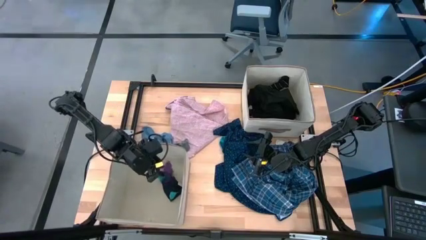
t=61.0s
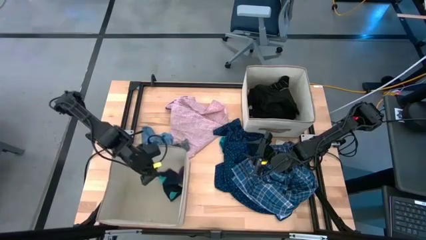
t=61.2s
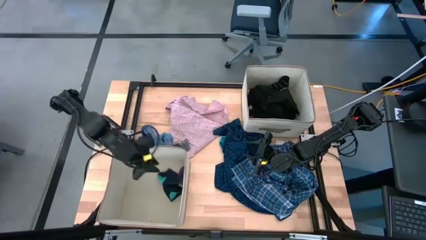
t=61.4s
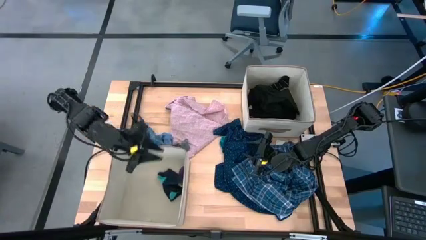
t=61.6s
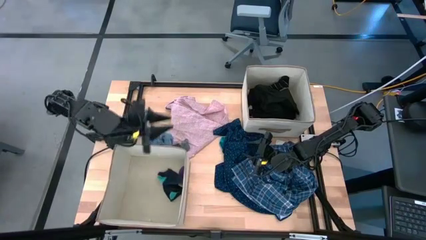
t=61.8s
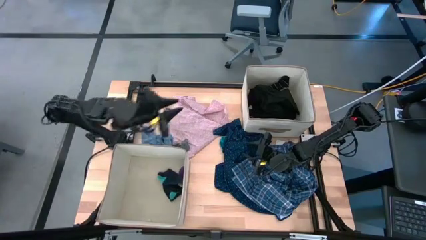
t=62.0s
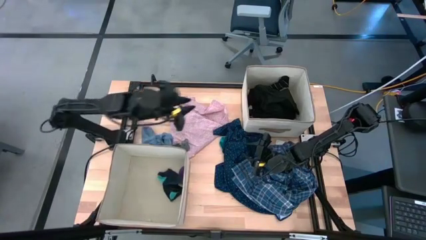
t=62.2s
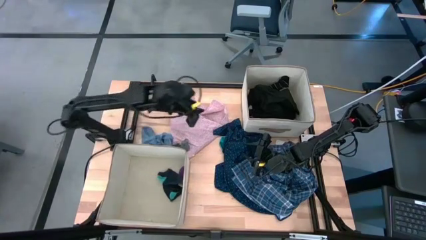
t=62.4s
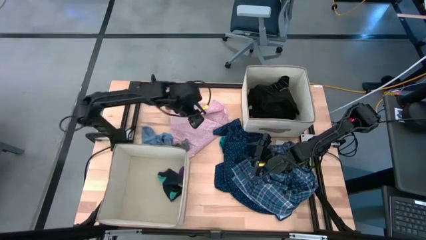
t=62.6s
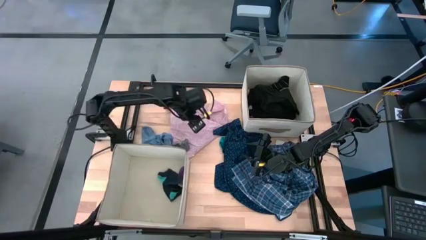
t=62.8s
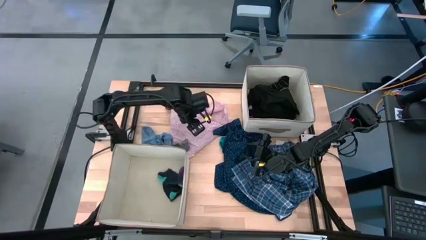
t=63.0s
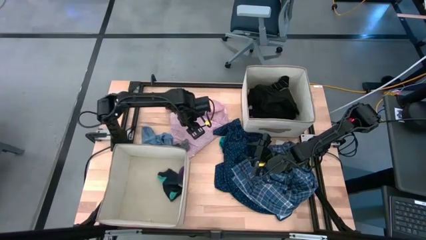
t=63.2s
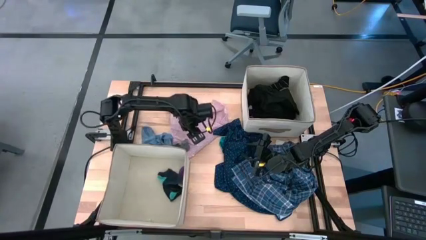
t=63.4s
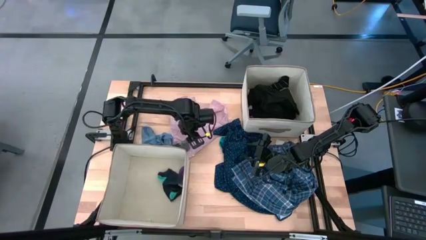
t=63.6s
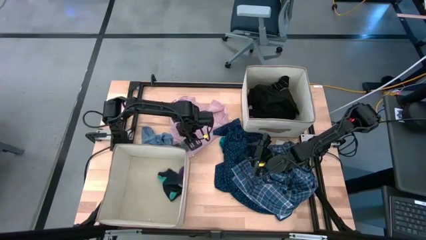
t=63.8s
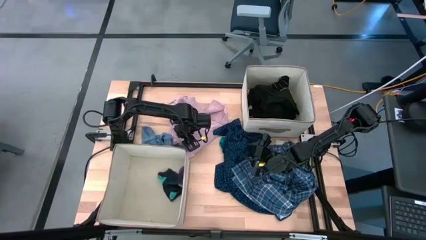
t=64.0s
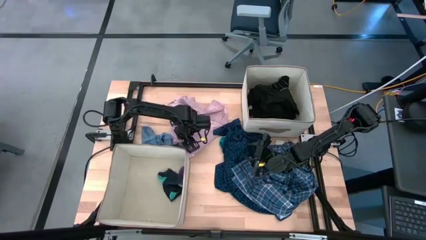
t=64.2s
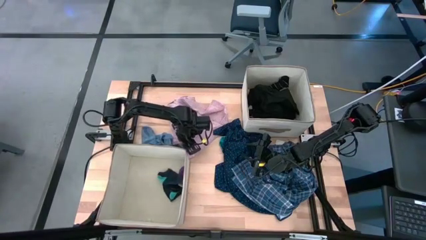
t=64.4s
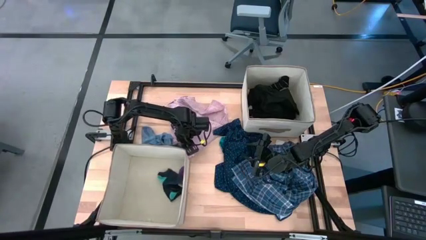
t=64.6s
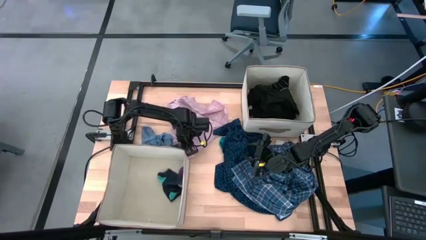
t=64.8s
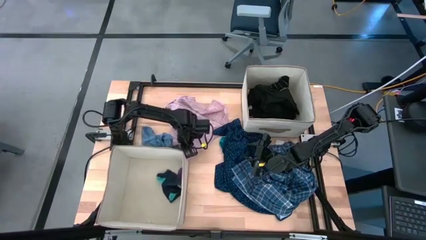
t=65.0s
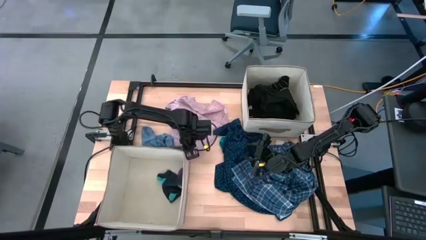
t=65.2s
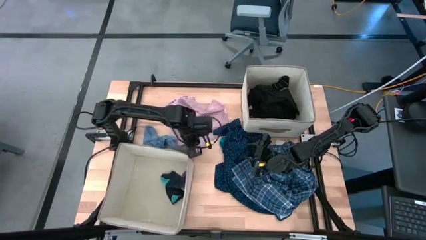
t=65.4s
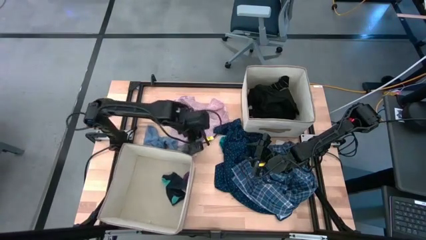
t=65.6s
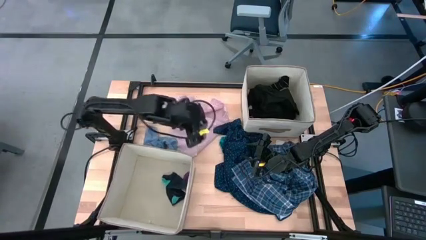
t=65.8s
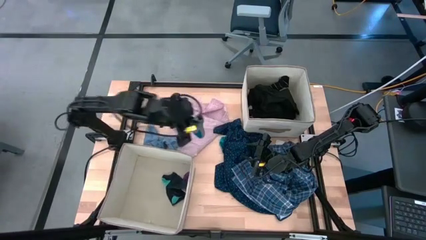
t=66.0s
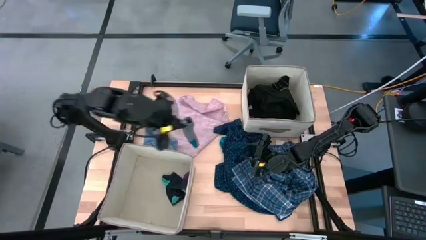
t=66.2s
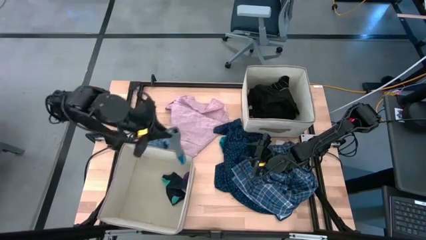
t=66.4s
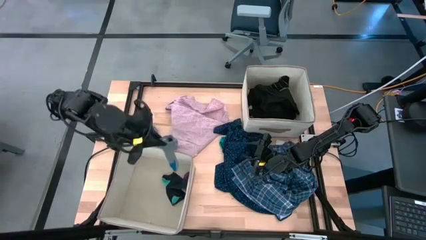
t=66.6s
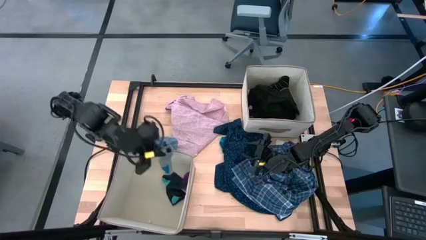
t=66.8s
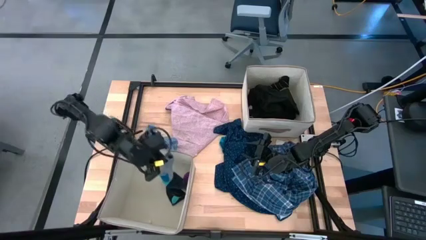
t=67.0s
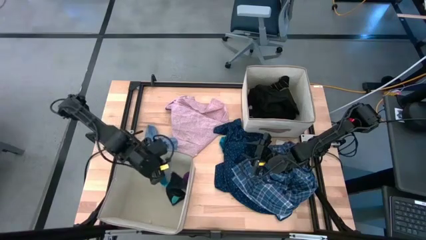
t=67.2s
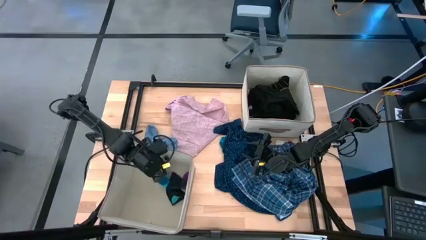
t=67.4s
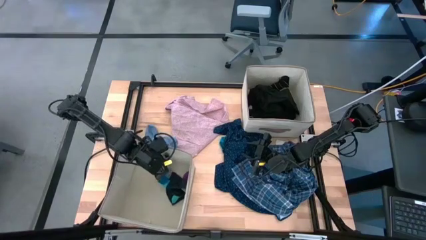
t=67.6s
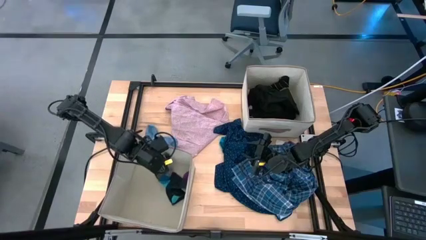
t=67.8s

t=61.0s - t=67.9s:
Task: Sort clothes
Put the gray sock into the bottom white laundry organizer

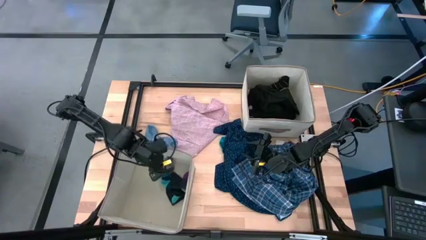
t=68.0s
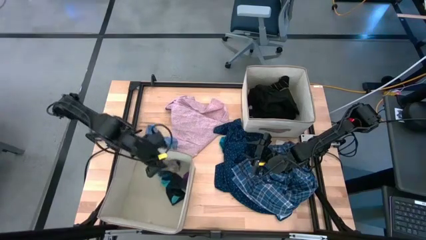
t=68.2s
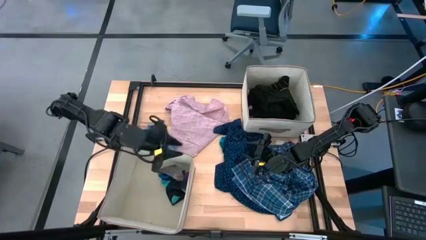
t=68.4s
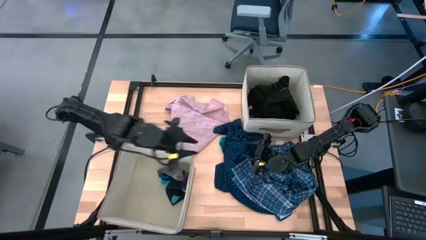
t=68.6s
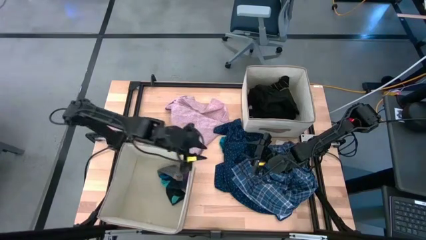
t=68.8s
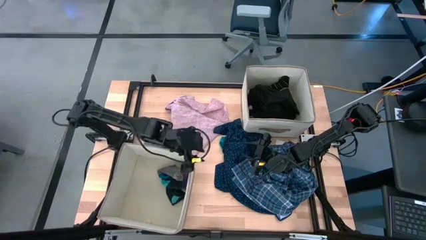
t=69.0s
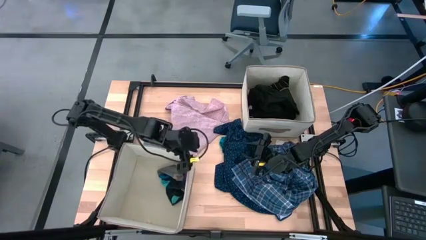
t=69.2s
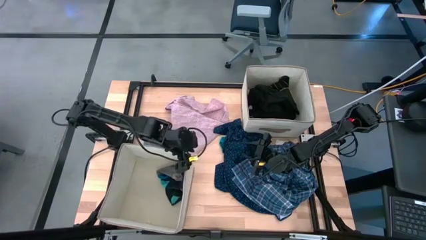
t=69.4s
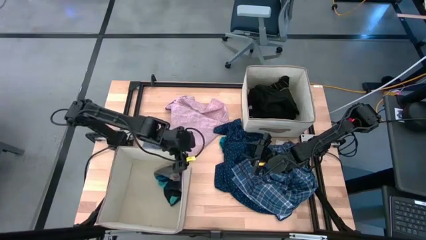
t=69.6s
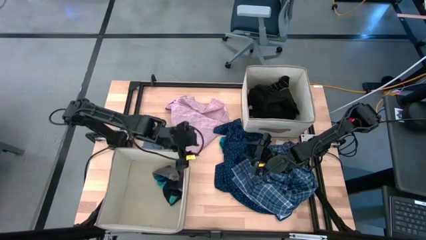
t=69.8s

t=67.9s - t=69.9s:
Adjust the bottom white laundry organizer on the table

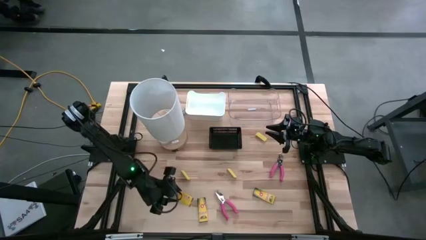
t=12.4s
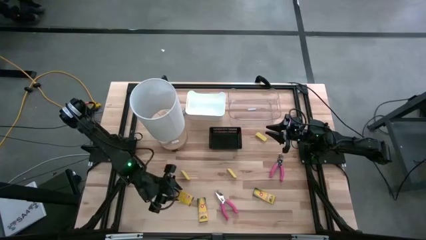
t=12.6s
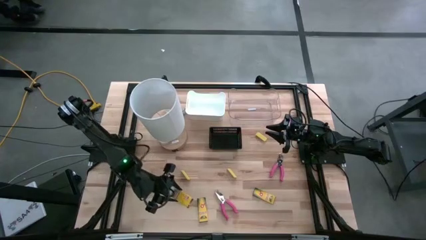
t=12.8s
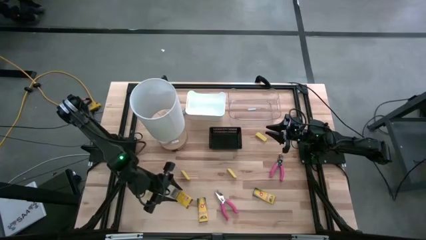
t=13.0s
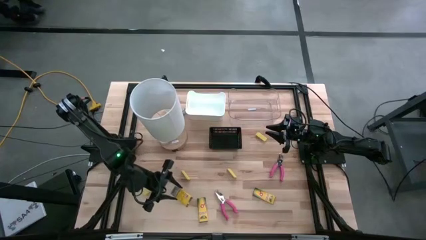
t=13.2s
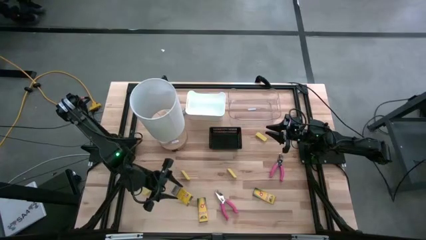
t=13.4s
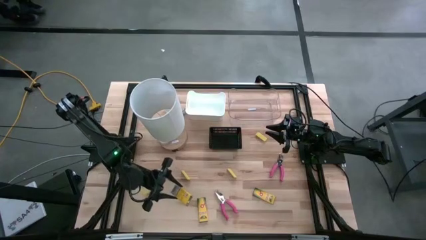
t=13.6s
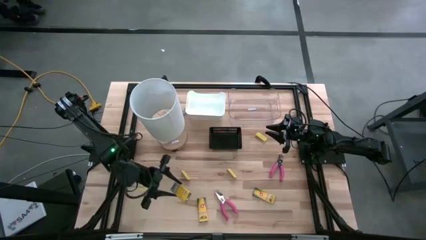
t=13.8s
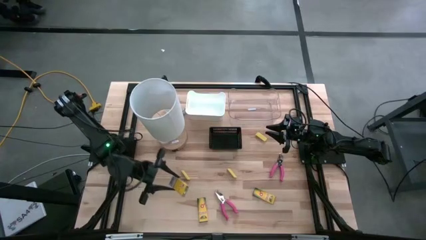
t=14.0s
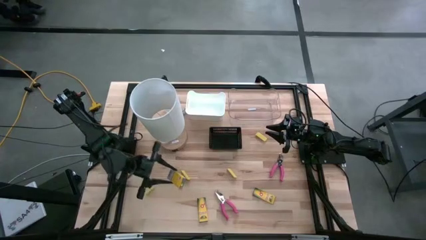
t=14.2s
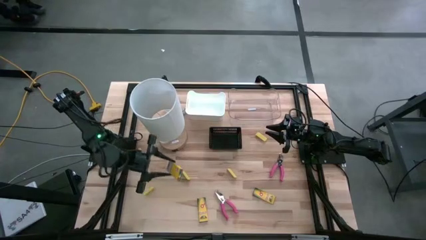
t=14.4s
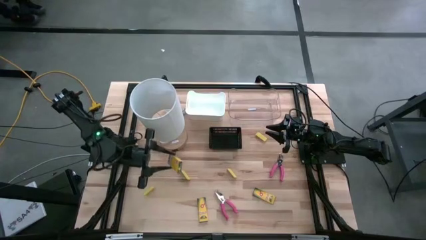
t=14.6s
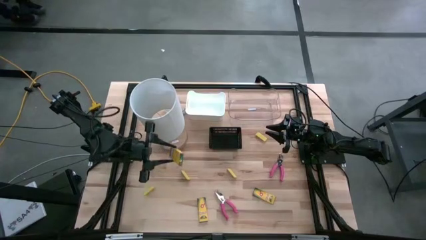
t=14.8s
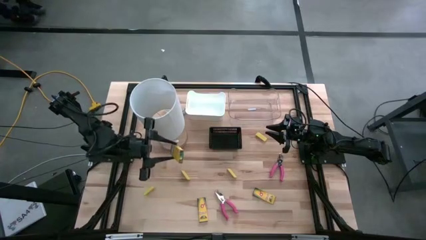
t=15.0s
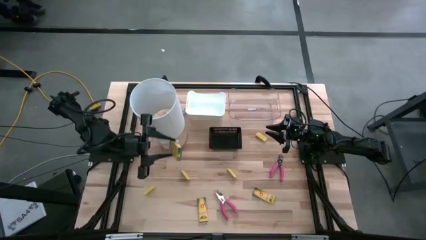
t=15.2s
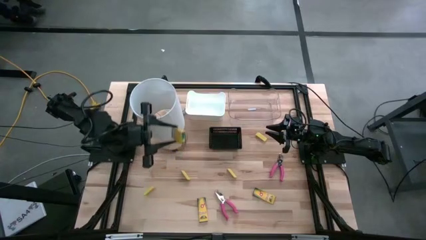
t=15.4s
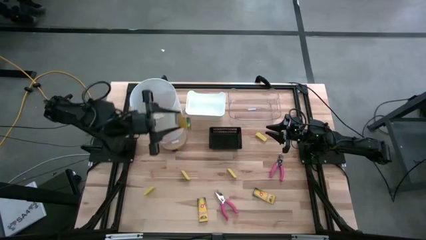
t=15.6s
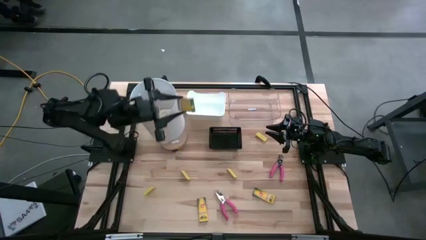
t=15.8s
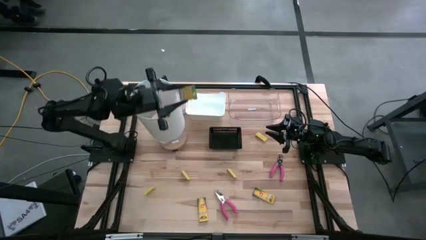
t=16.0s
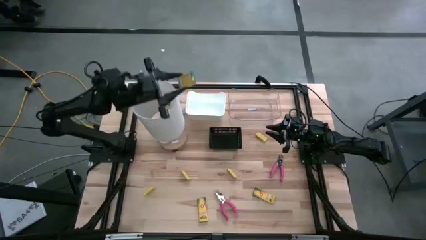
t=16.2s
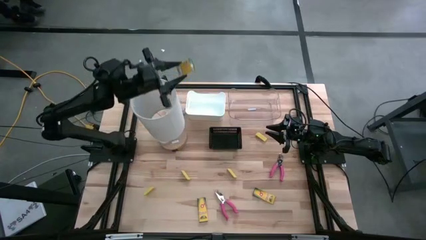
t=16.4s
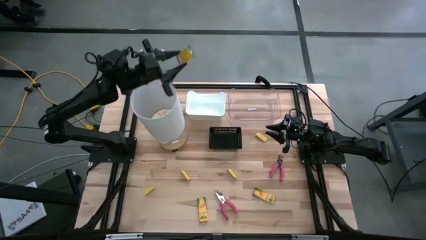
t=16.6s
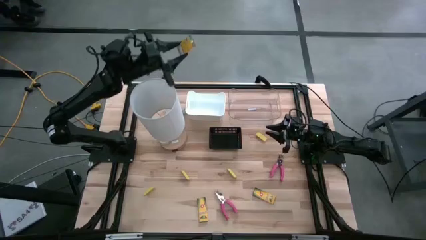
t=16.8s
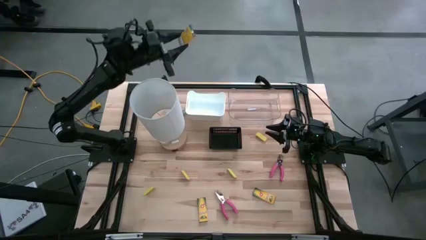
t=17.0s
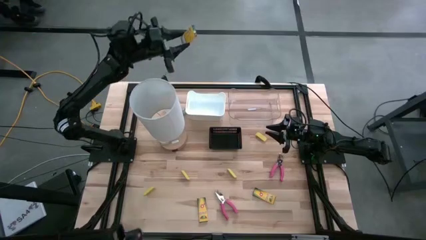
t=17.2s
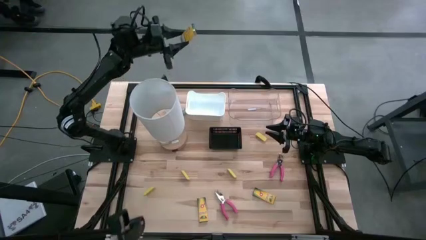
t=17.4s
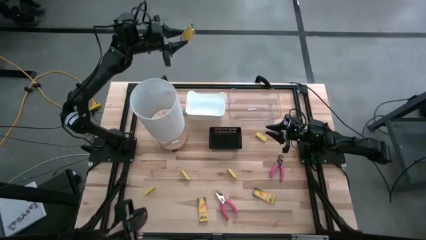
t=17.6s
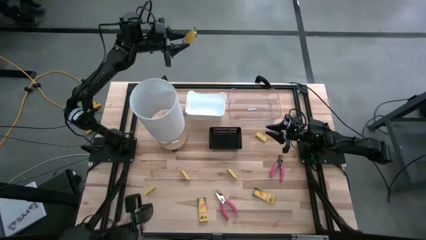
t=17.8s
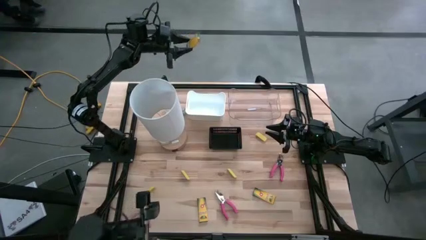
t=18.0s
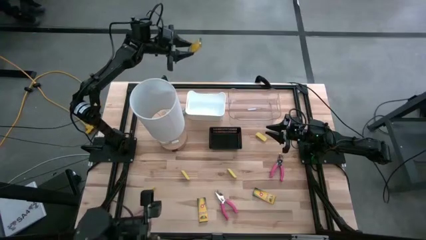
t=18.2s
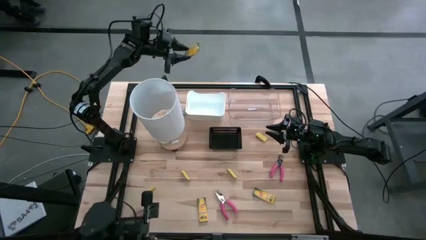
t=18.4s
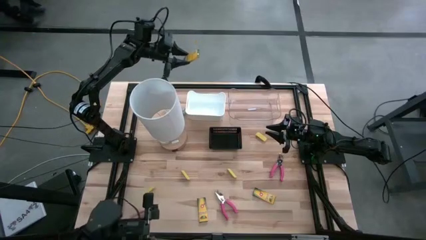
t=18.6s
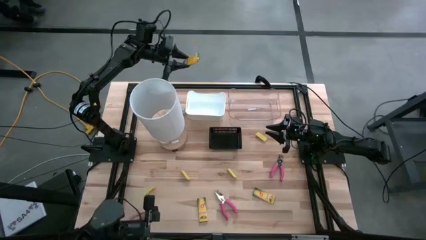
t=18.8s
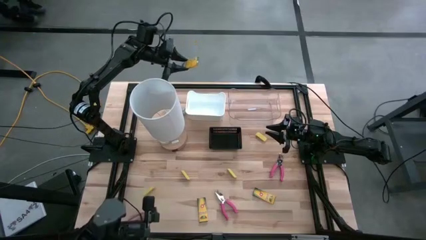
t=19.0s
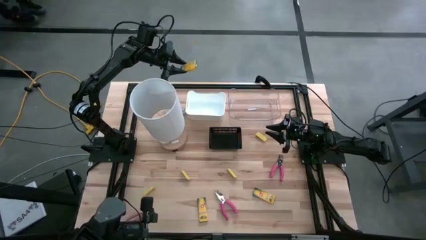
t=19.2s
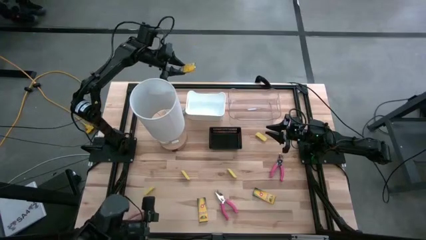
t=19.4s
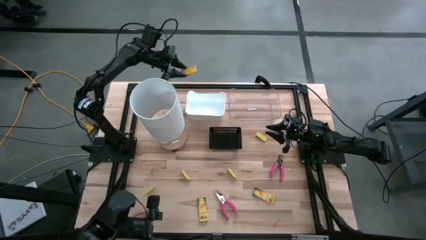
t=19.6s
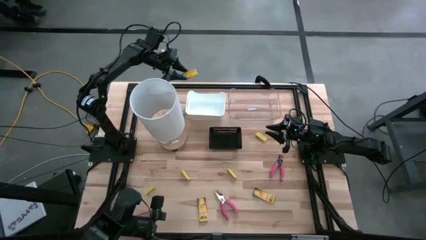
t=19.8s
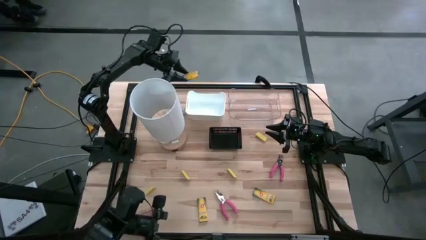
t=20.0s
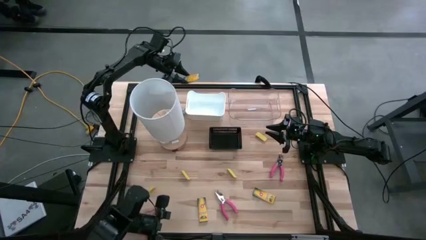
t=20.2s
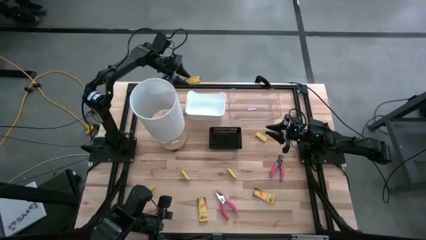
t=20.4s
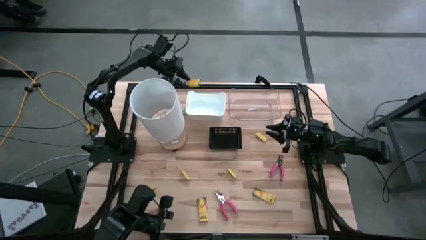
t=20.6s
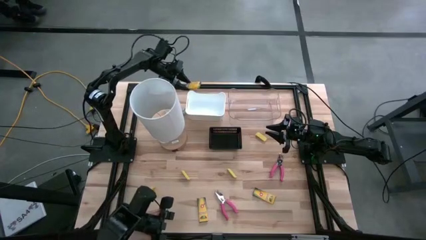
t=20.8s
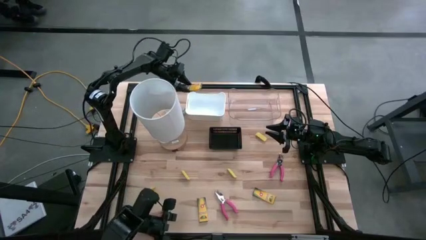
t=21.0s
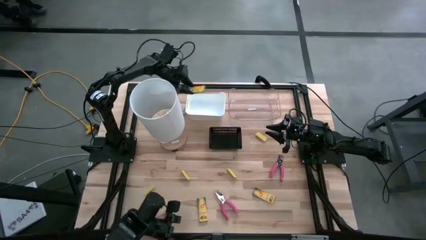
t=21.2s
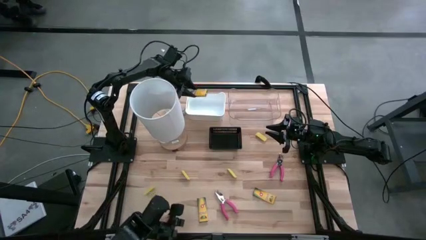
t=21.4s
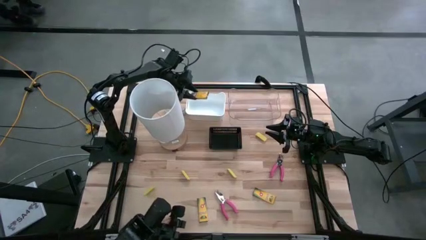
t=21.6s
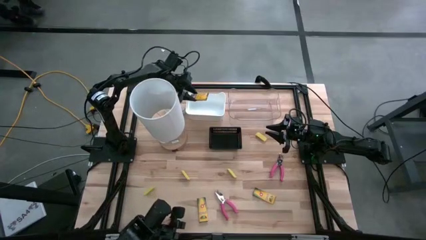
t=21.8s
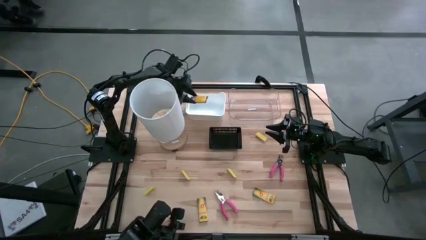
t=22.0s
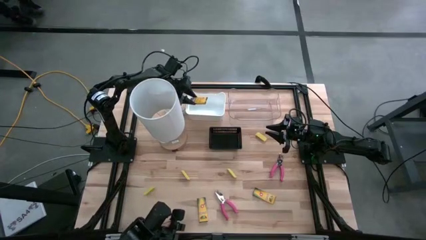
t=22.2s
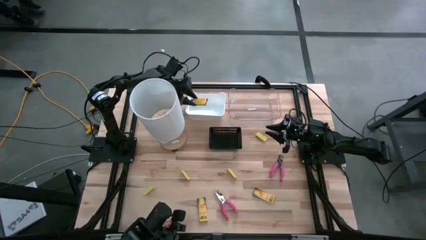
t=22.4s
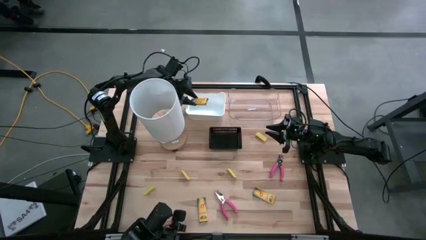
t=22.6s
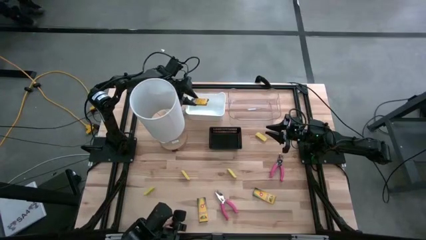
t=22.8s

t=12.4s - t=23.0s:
Task: Pick & Place School Supplies
Put the yellow crayon box into the white bin
